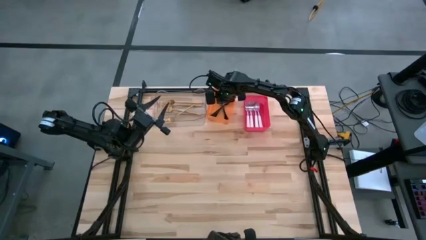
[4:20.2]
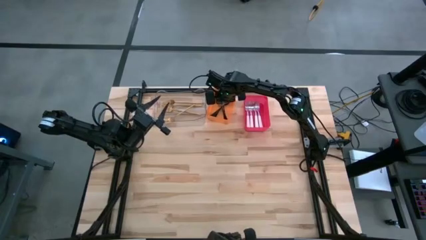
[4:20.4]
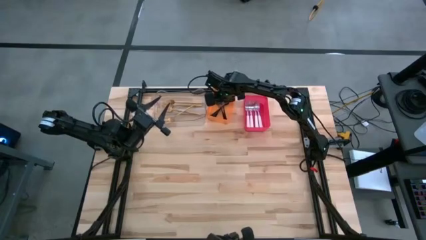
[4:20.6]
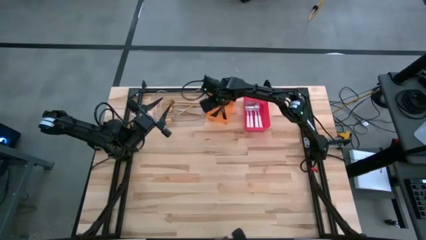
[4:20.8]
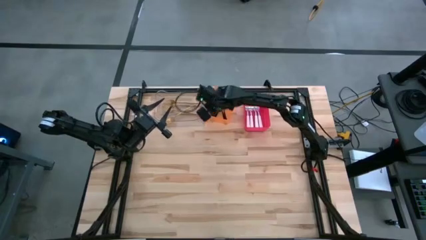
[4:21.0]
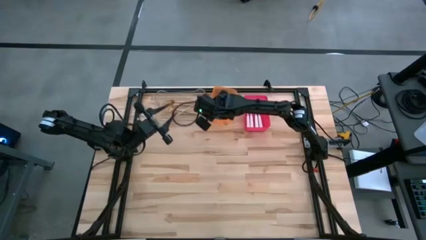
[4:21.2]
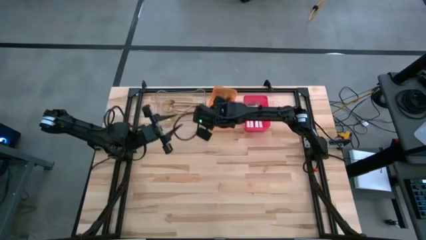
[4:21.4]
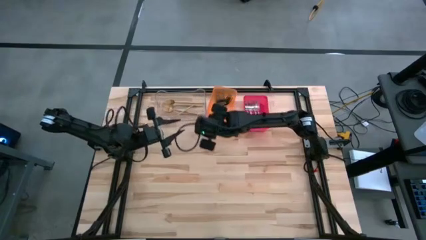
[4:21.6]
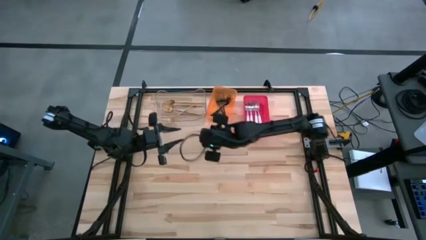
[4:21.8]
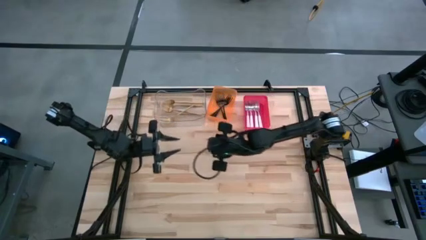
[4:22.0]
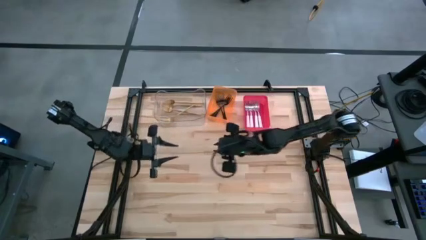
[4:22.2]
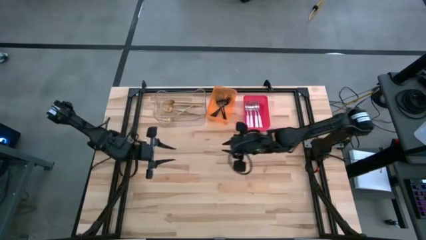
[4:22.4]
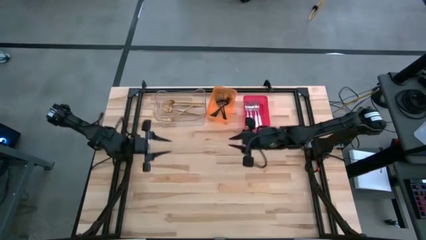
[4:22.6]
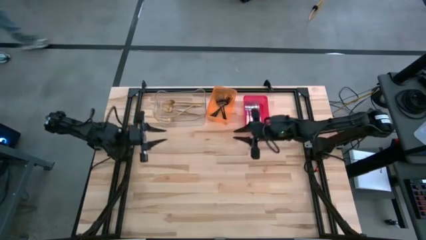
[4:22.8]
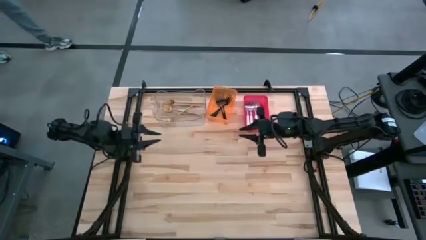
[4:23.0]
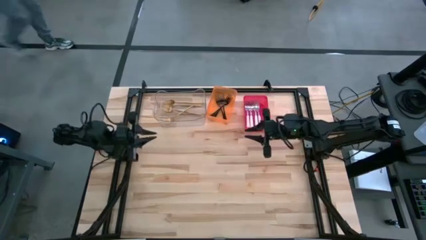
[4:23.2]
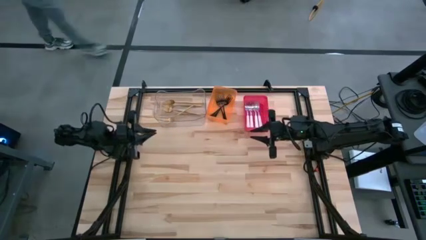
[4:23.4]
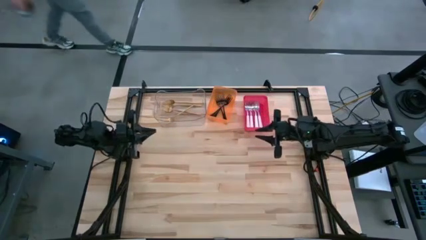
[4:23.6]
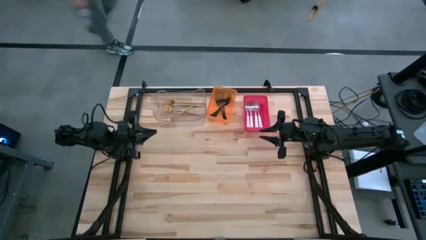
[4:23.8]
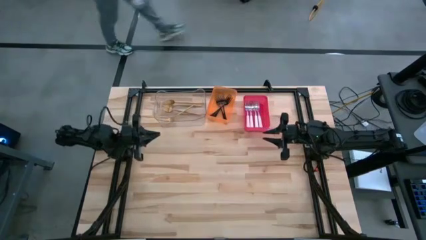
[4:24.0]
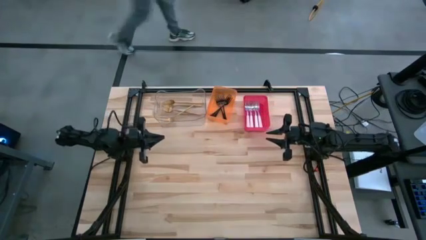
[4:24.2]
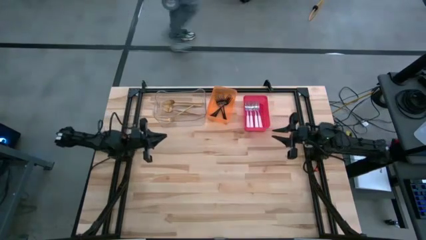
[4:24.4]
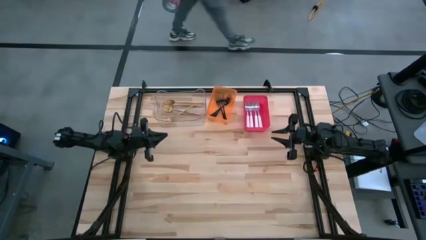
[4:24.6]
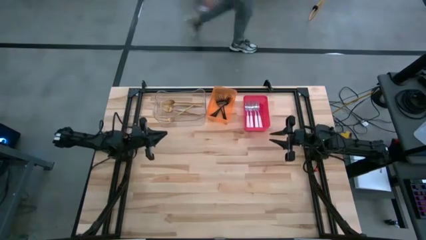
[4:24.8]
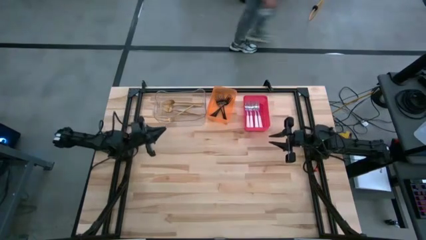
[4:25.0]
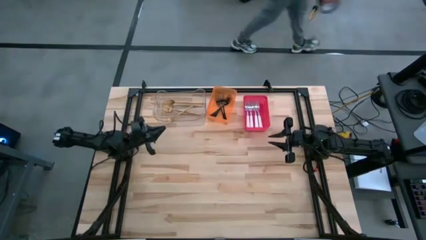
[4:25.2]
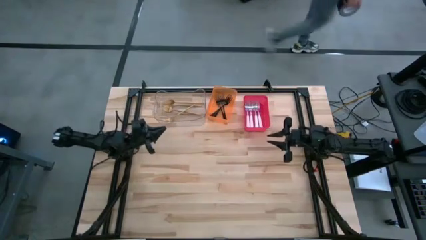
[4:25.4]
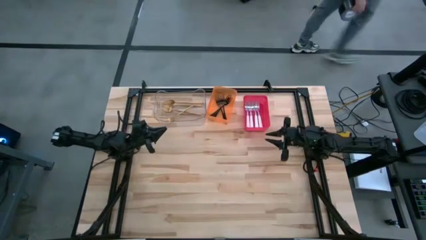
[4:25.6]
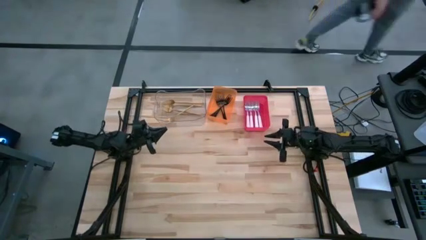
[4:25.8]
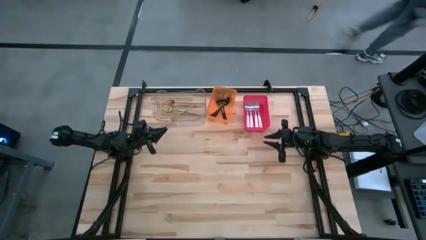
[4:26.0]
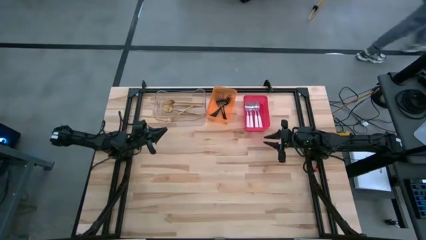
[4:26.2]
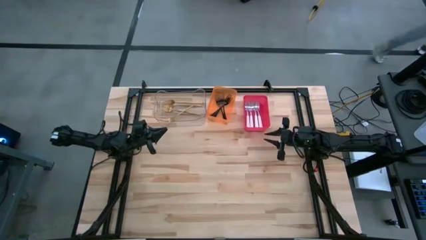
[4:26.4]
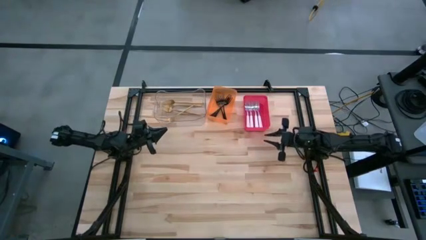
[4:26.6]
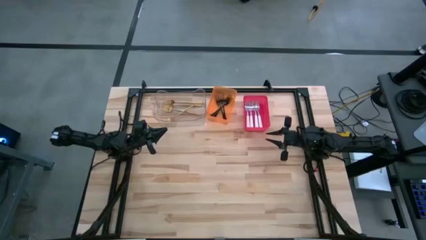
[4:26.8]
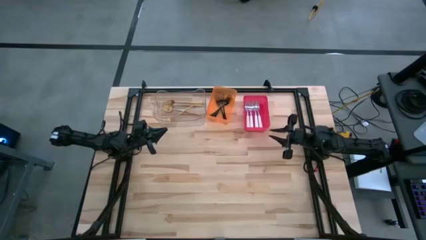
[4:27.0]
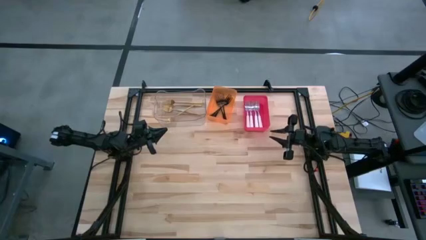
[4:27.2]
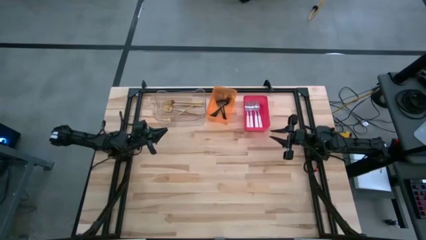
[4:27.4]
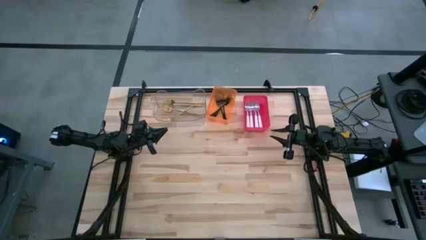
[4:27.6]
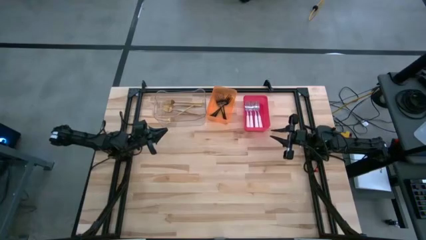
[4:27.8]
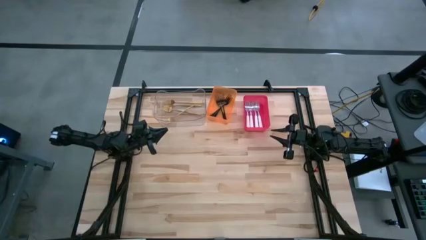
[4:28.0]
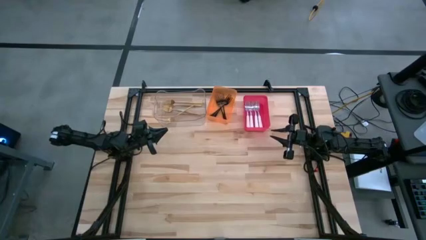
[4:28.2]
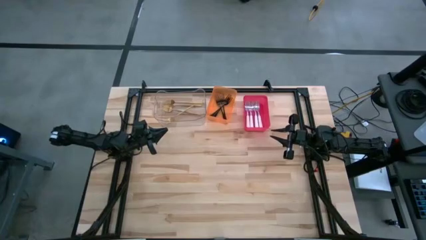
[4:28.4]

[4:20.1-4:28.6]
Task: Sort silverware by color (type)
Return to Home Position

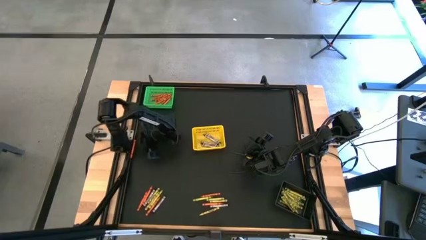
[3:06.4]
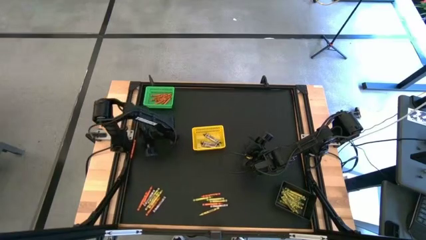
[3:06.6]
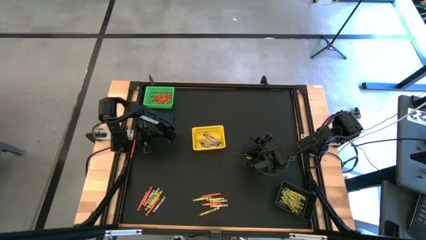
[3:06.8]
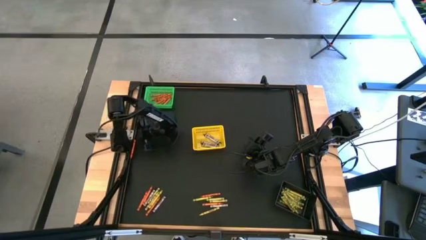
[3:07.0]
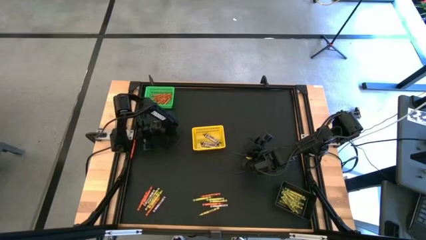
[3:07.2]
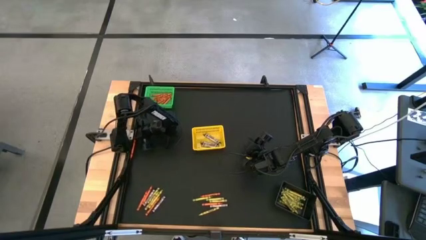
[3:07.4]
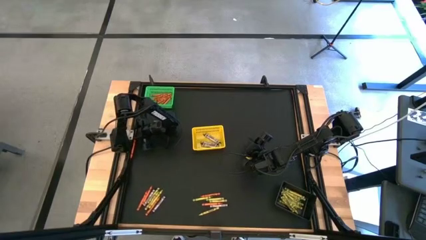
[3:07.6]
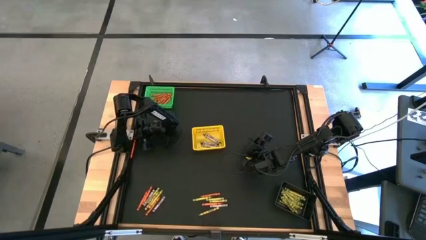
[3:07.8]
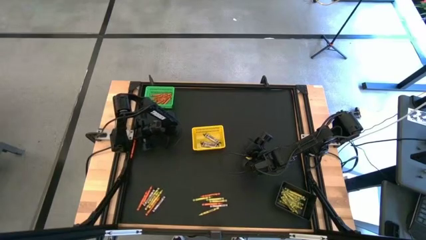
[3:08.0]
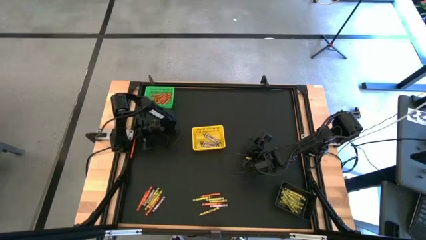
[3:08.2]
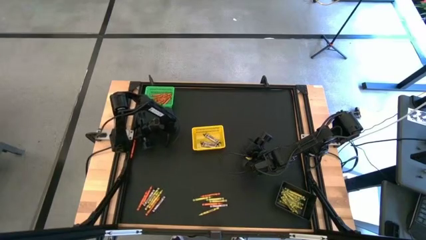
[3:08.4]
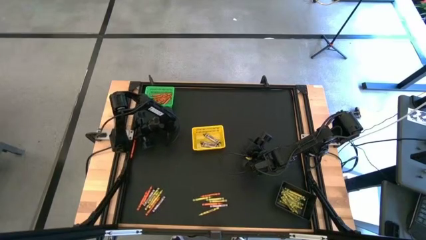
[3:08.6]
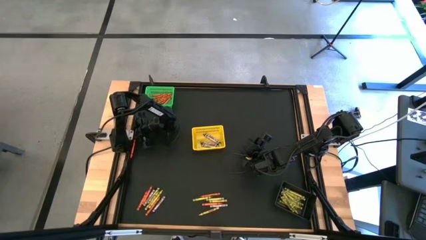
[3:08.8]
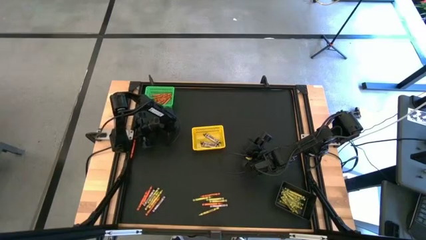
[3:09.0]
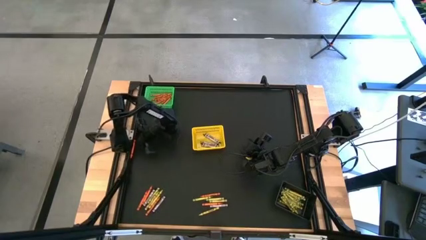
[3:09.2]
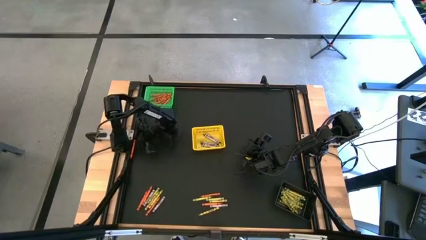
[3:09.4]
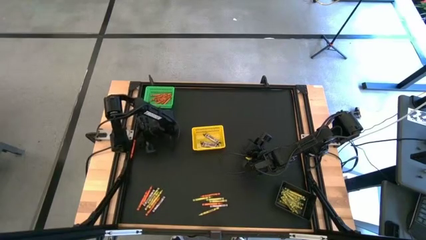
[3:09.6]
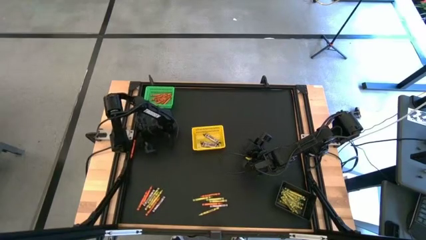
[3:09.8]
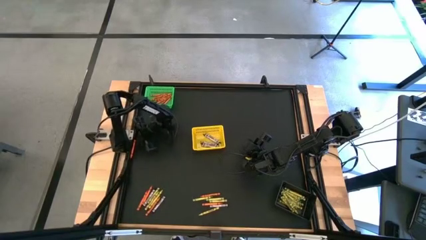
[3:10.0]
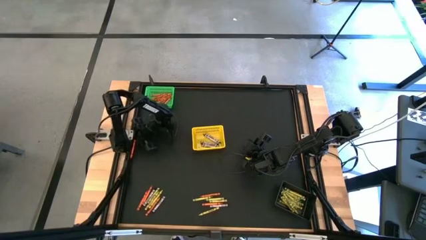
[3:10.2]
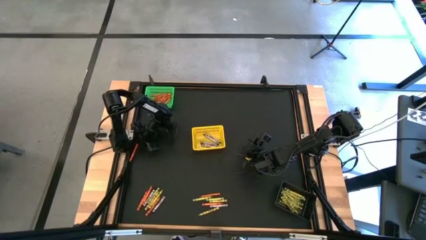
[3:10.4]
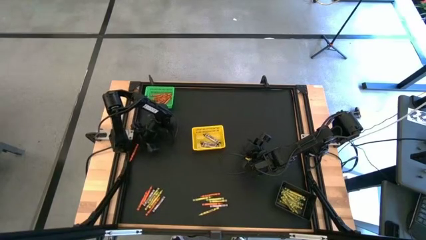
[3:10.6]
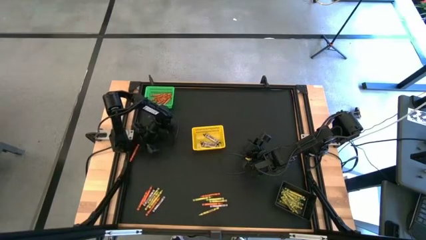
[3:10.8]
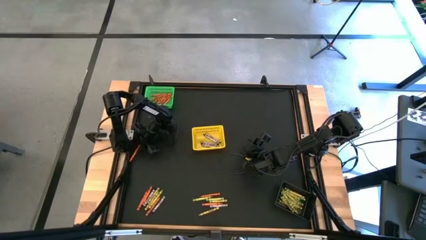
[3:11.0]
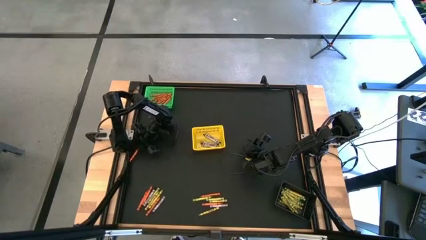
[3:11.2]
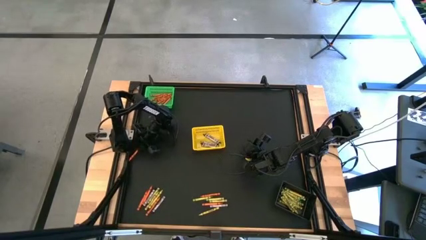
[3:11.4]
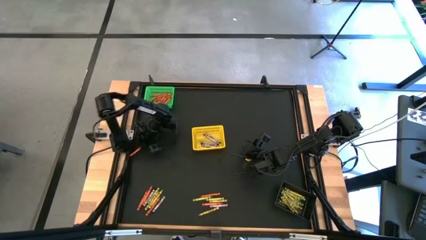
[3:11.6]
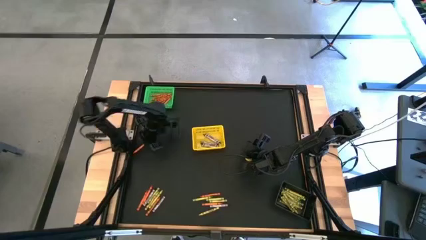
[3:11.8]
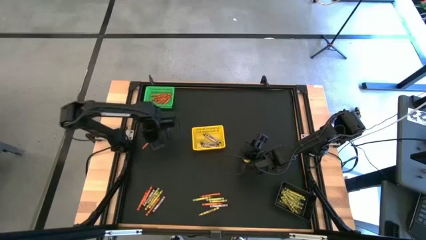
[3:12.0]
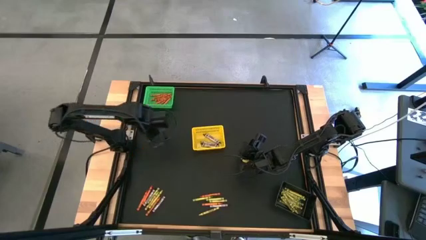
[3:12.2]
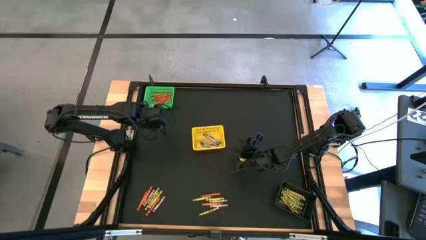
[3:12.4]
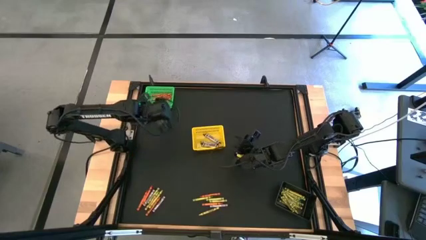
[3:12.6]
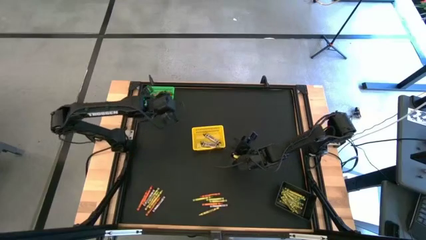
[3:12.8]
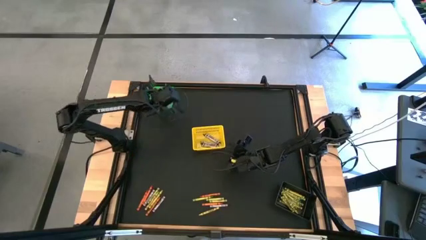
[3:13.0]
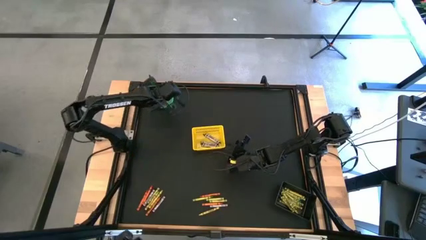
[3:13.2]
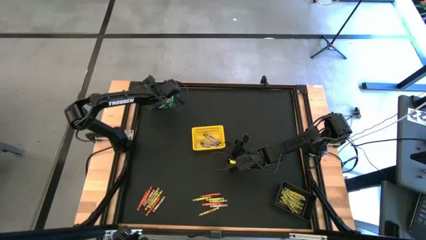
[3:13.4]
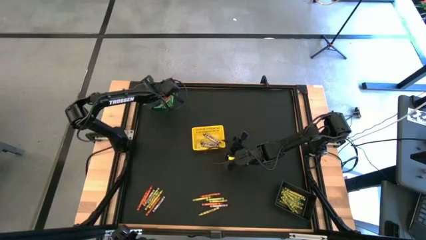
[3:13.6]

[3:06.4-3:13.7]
Task: Sort crayons
Put the orange crayon into the green bin
